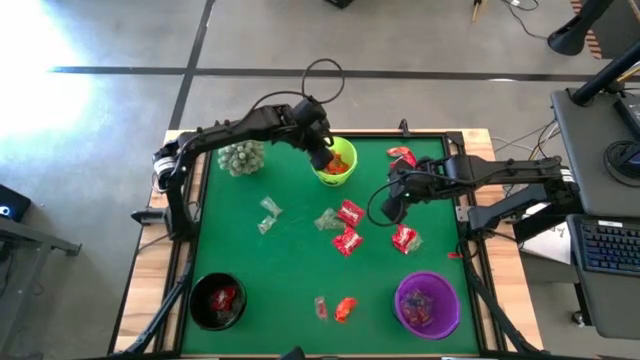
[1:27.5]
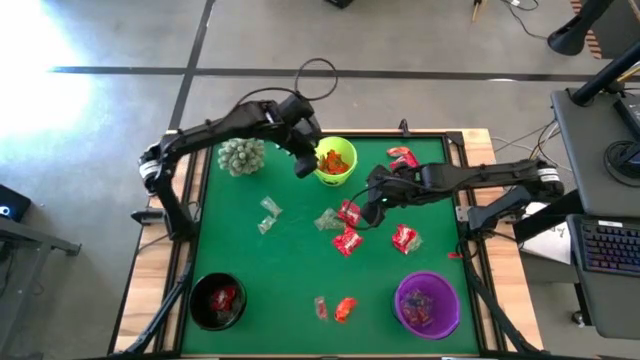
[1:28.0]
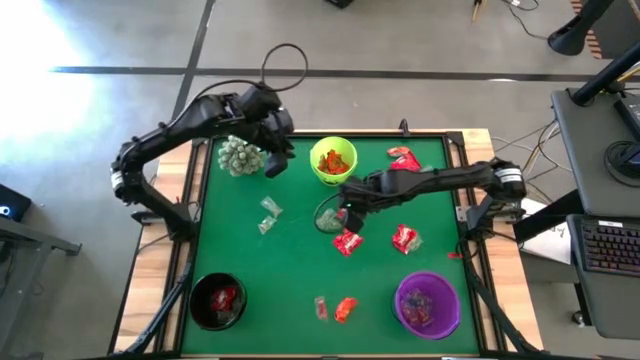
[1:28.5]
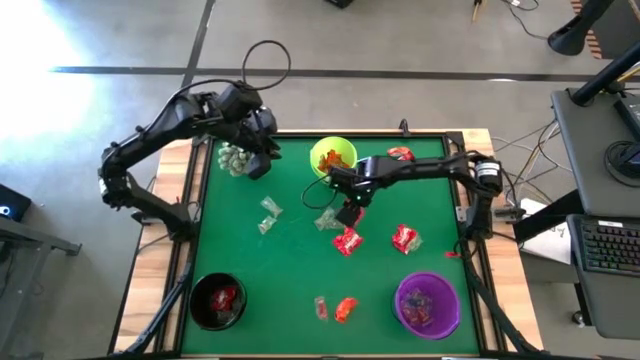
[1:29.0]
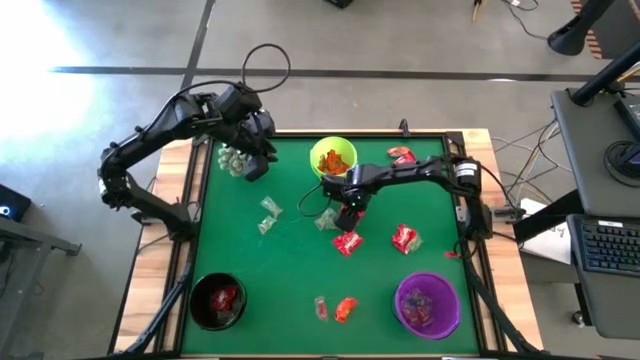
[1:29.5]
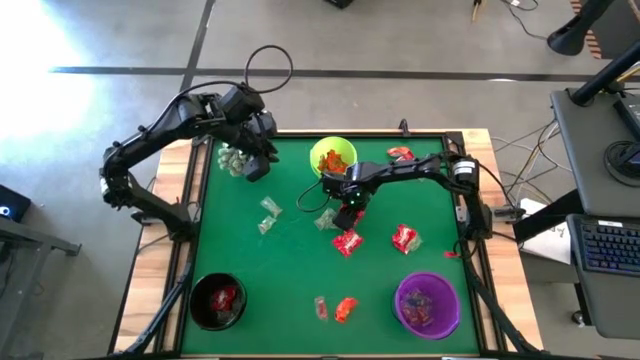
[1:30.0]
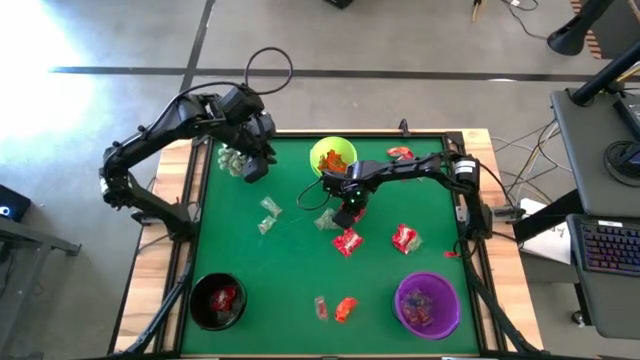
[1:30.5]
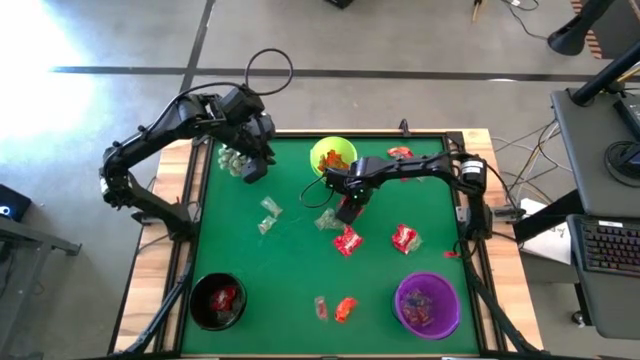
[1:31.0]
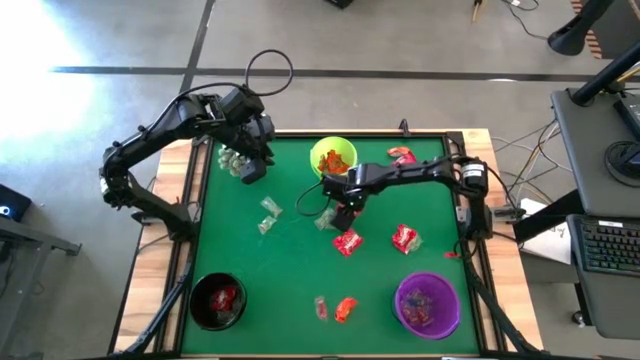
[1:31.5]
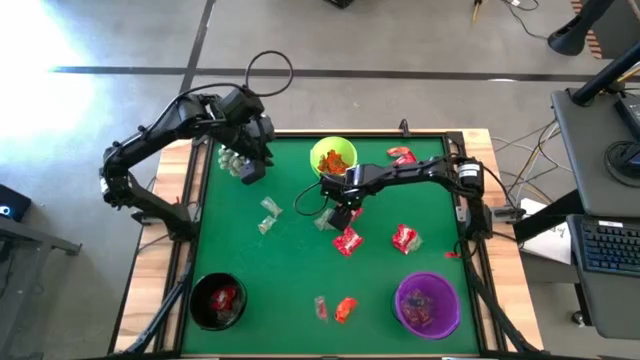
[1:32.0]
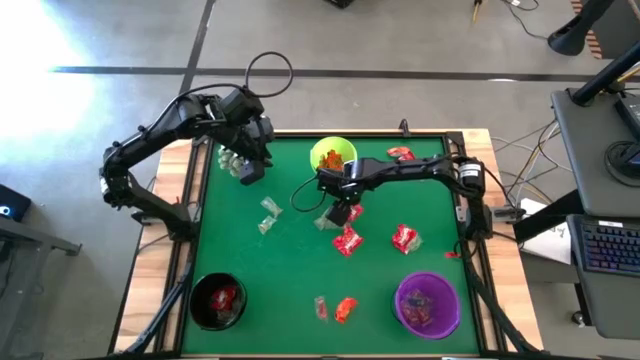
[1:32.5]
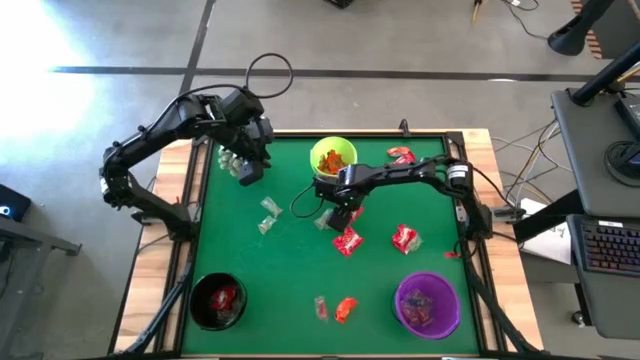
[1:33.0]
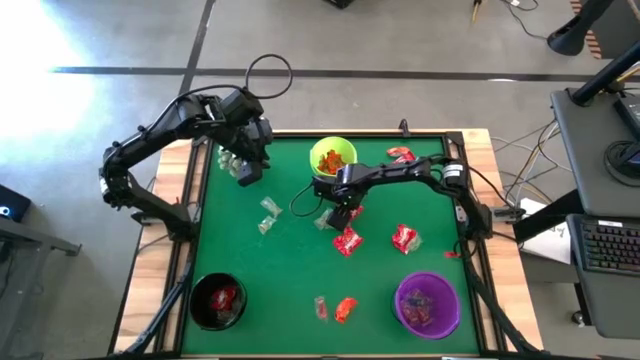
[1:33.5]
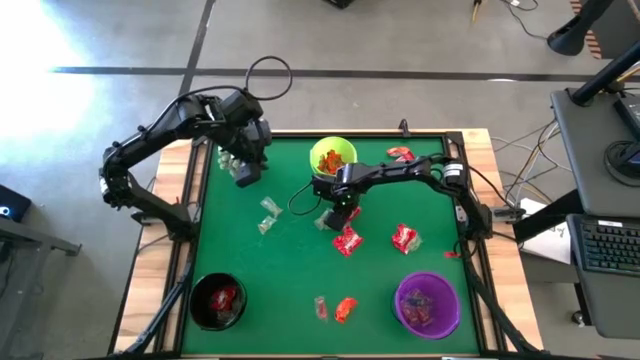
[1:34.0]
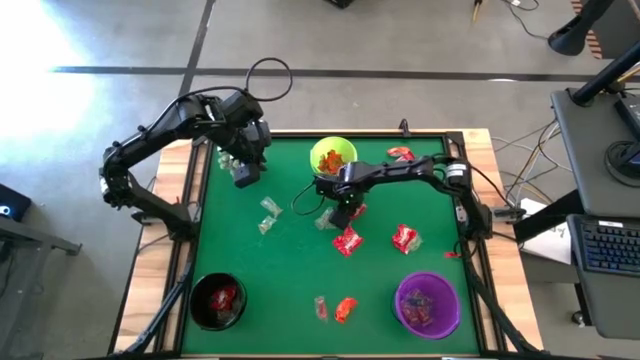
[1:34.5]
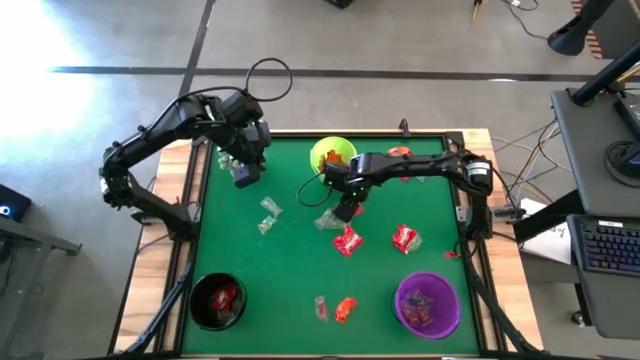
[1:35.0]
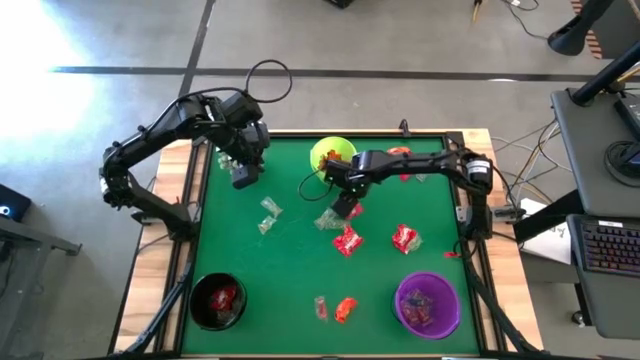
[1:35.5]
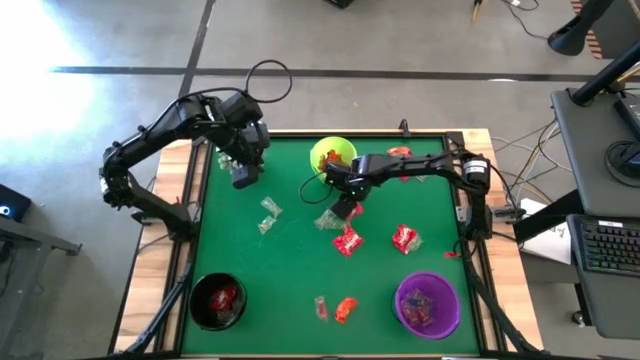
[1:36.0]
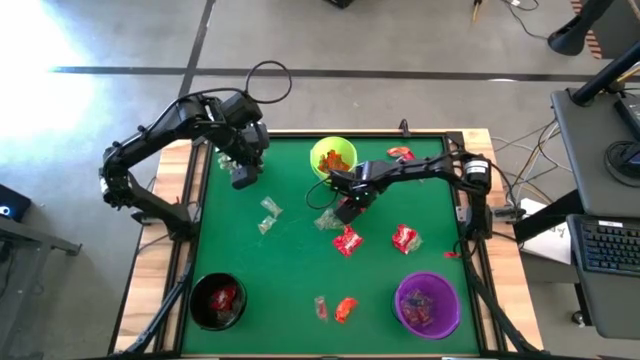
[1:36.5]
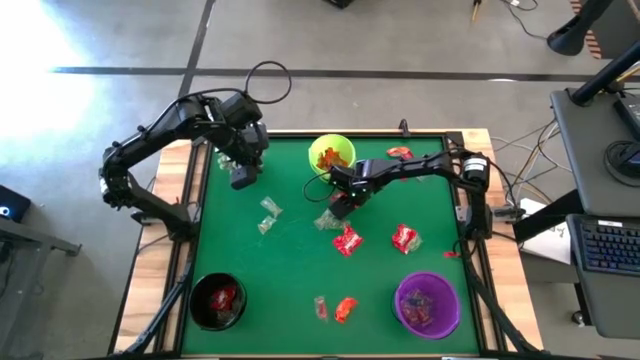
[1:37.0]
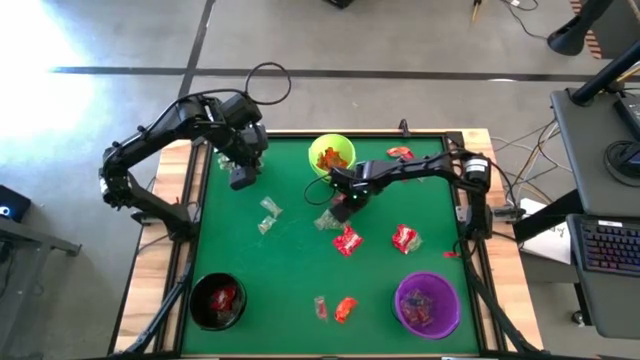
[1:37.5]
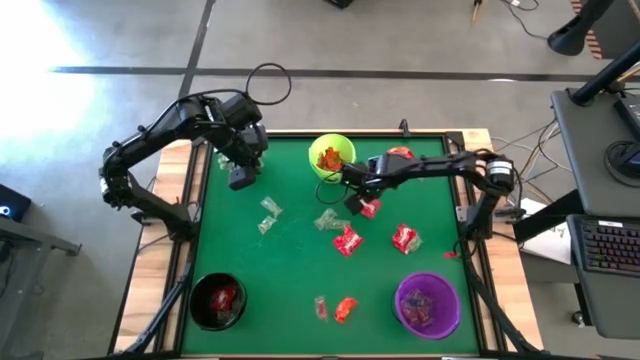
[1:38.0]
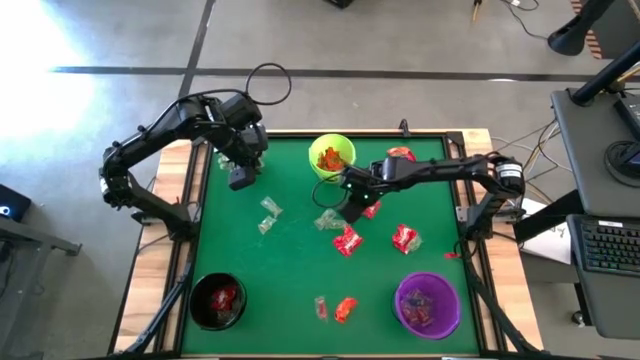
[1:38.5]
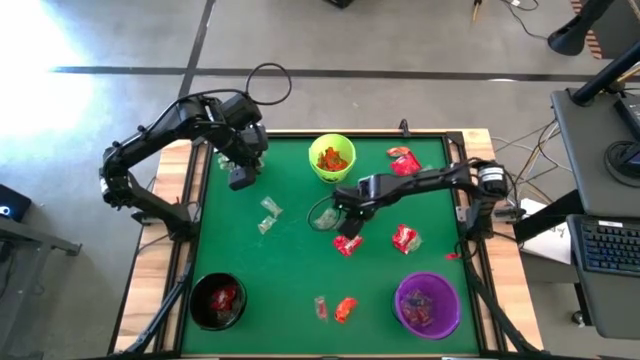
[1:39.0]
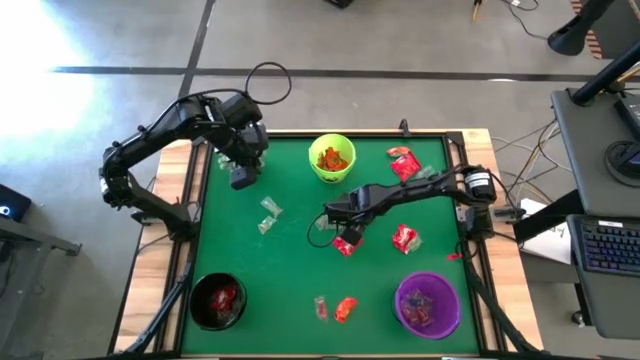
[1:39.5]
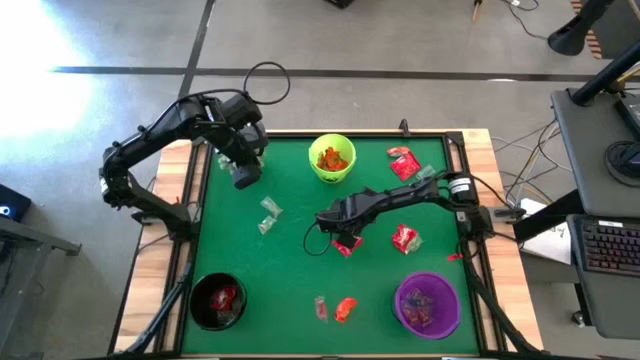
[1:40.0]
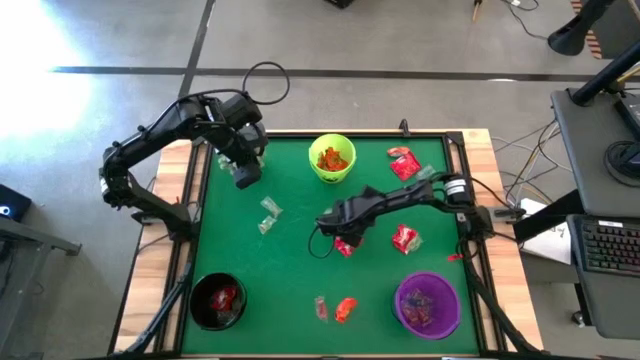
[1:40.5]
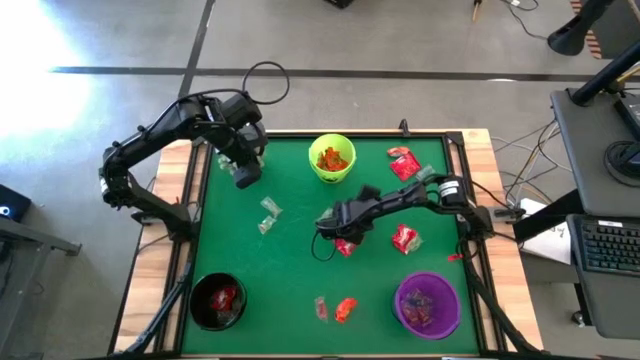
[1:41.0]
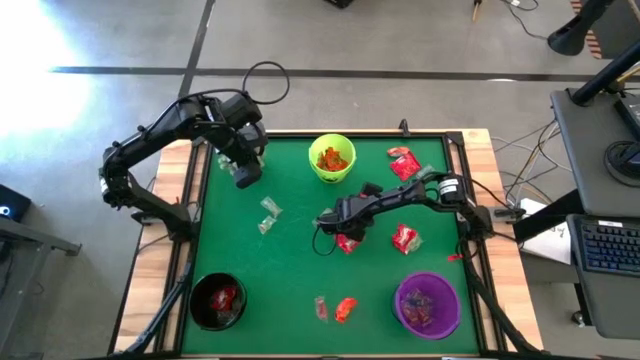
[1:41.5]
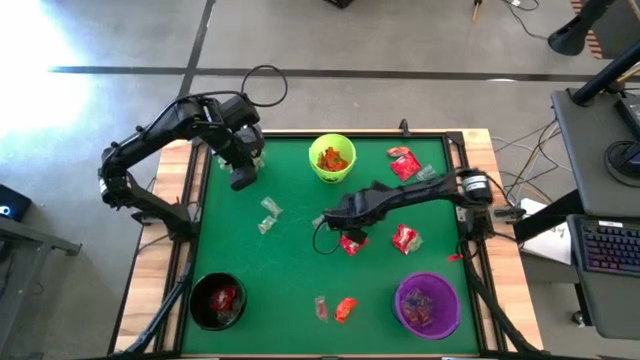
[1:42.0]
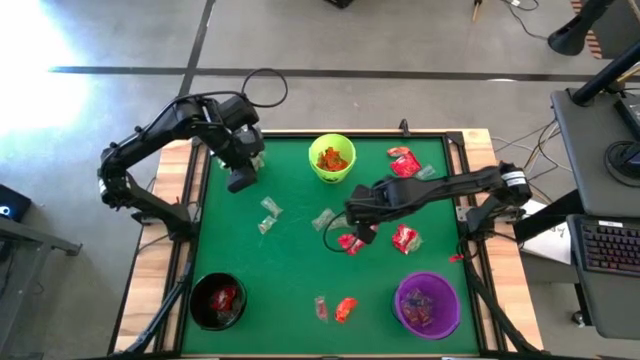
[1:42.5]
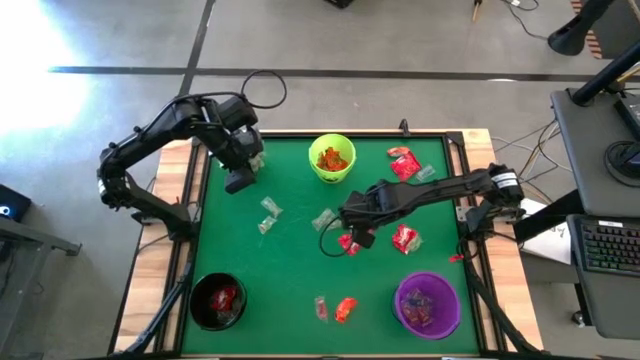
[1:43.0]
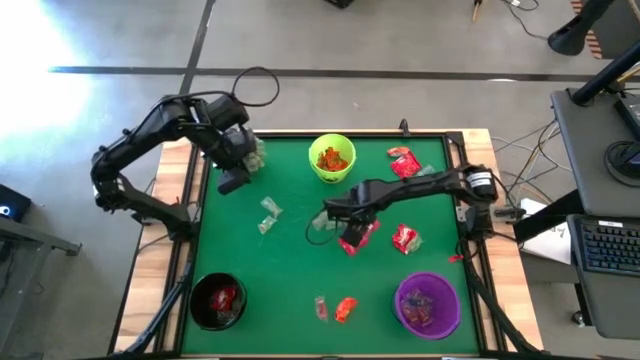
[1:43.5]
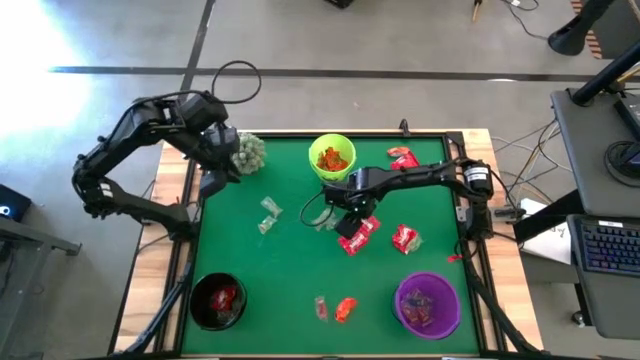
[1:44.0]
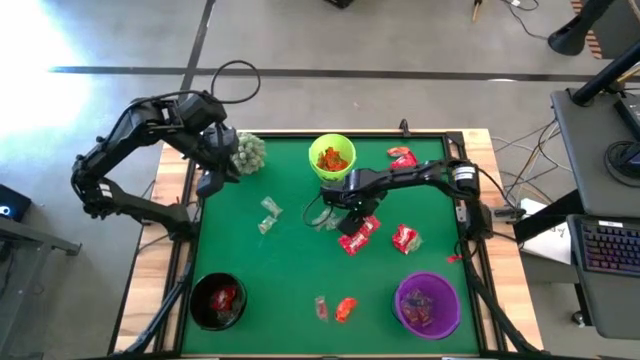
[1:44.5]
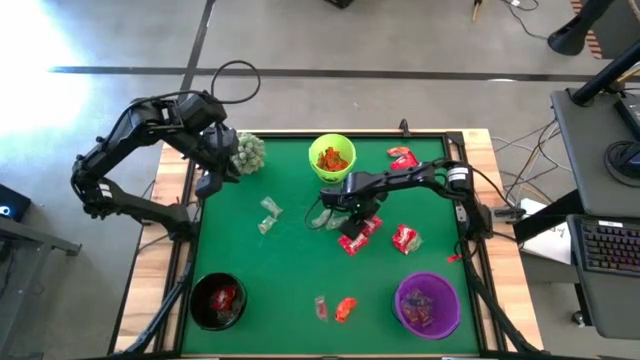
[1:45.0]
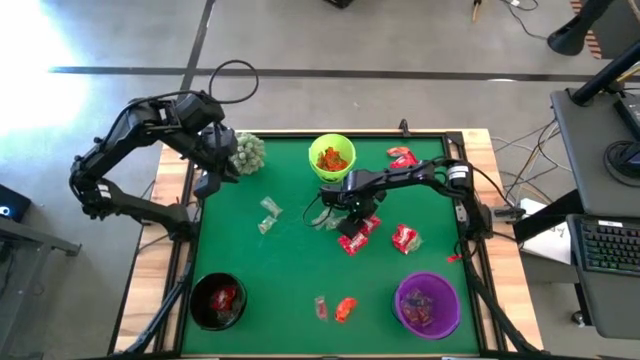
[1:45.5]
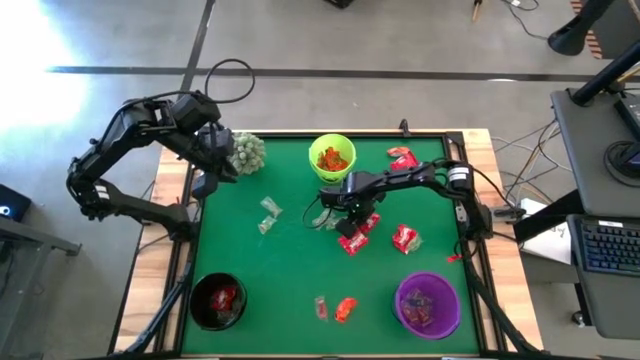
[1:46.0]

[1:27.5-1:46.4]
Task: Organize candy in baskets
Put the red candy into the green bucket

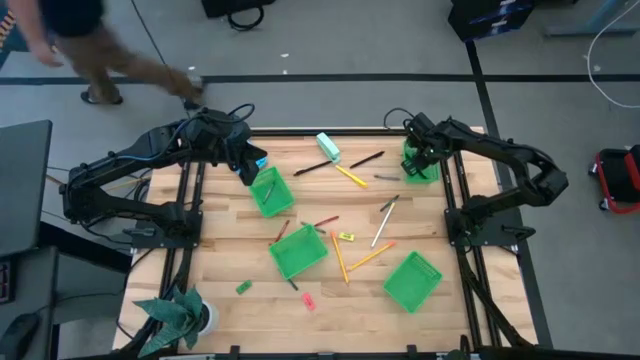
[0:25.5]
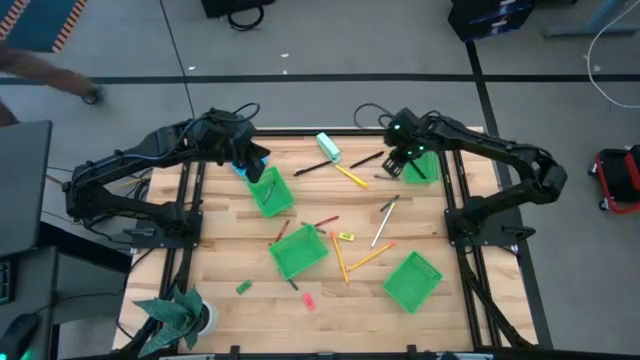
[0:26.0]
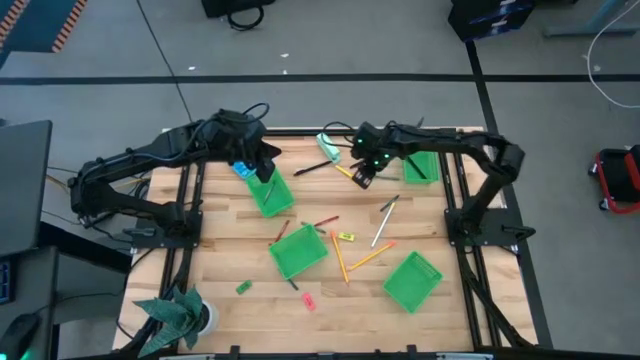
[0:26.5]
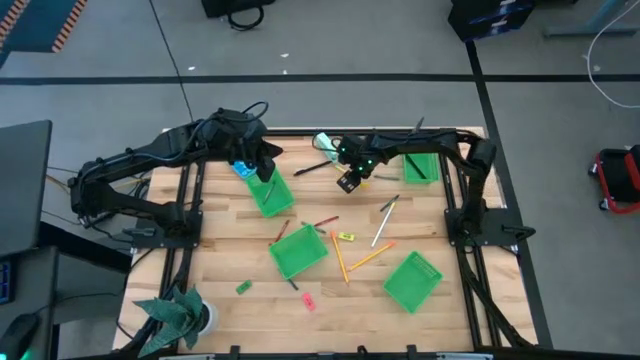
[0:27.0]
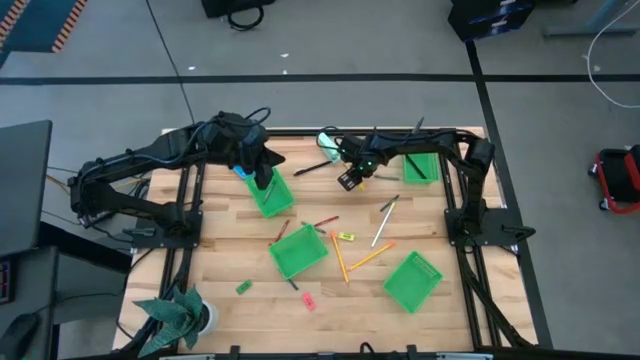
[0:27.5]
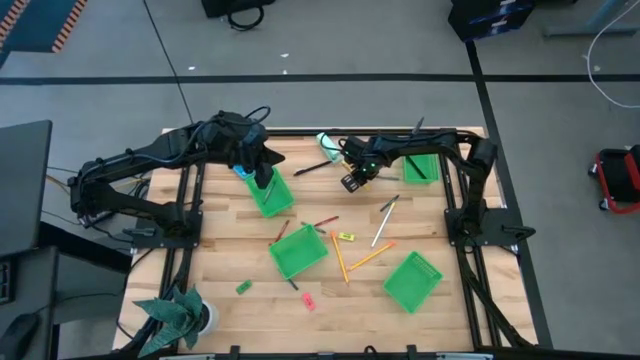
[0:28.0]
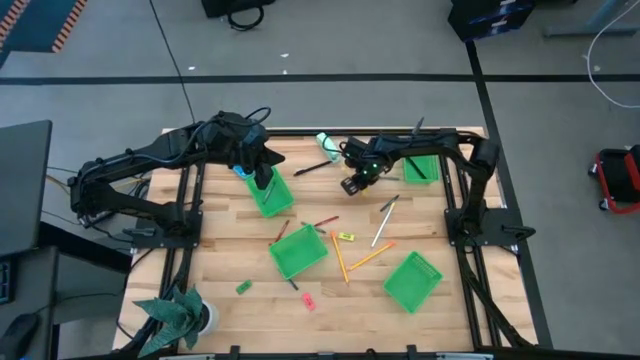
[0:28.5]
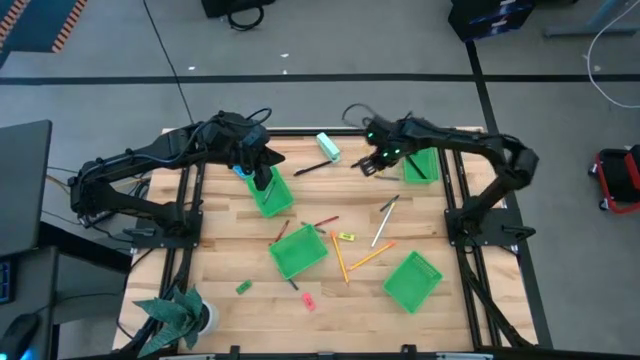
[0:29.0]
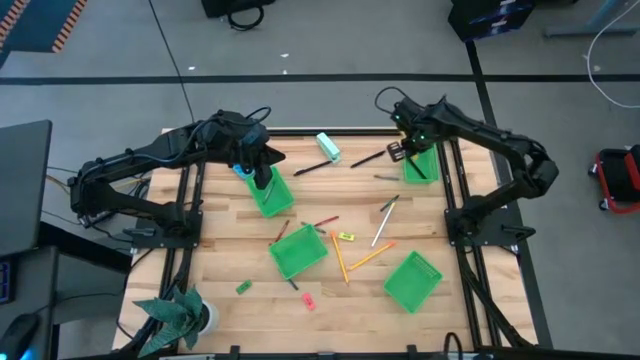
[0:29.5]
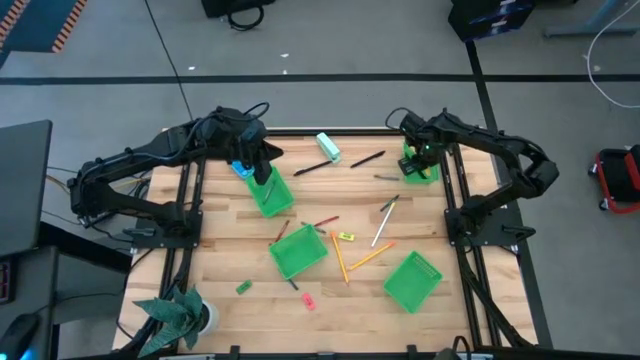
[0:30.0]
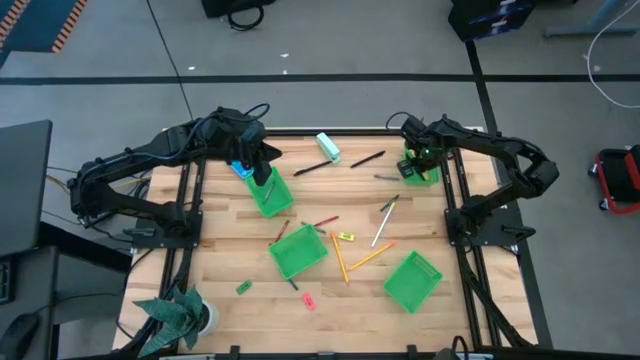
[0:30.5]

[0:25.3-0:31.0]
Task: Sort crayons/erasers/pens/pencils in bins
Put the yellow pen into the top right green bin
